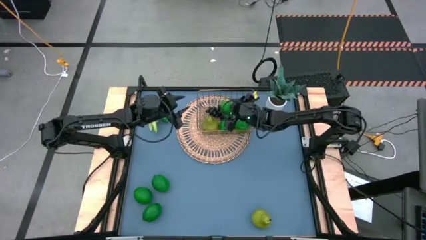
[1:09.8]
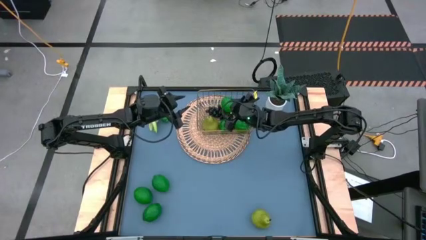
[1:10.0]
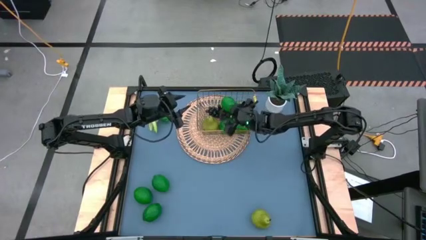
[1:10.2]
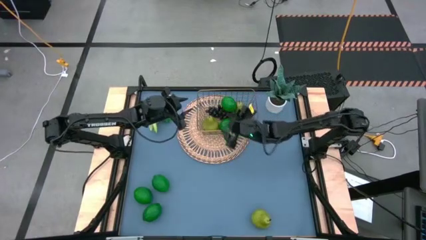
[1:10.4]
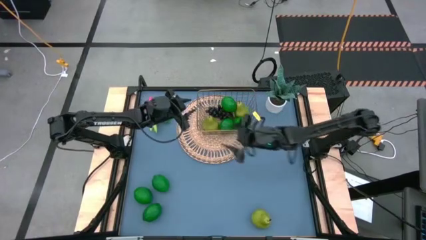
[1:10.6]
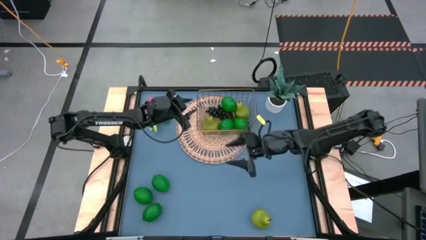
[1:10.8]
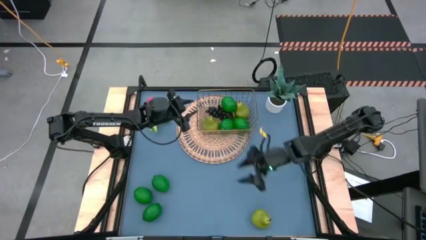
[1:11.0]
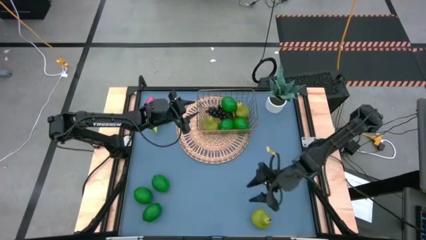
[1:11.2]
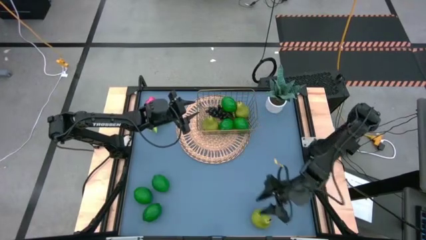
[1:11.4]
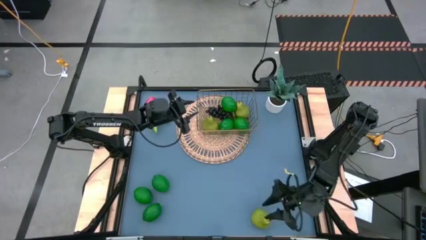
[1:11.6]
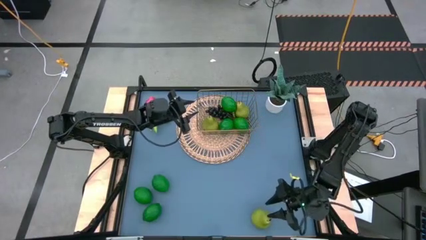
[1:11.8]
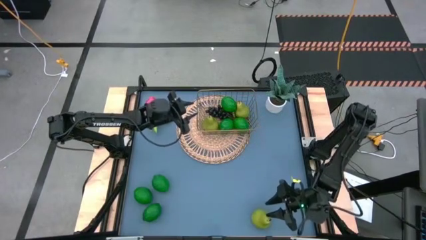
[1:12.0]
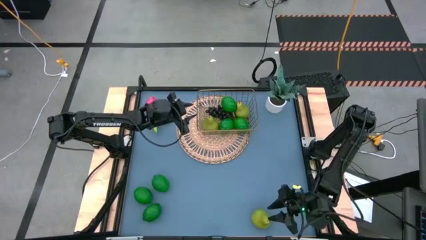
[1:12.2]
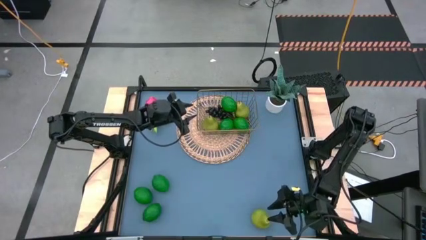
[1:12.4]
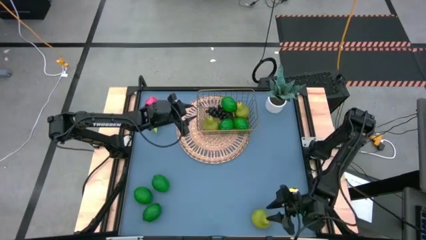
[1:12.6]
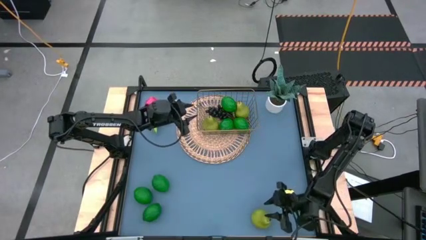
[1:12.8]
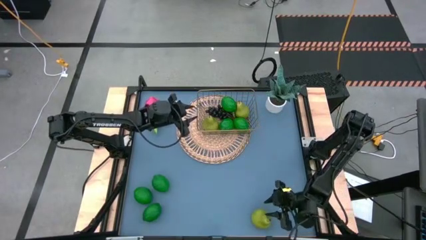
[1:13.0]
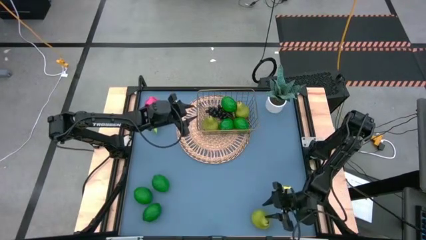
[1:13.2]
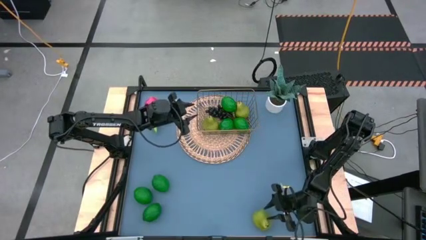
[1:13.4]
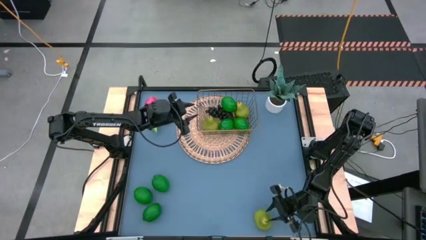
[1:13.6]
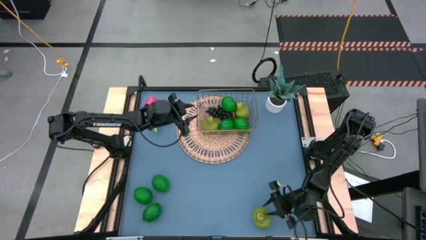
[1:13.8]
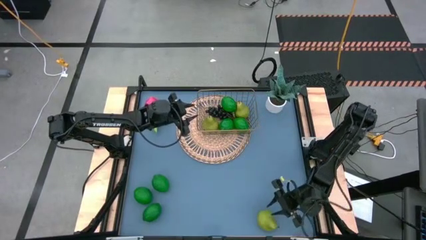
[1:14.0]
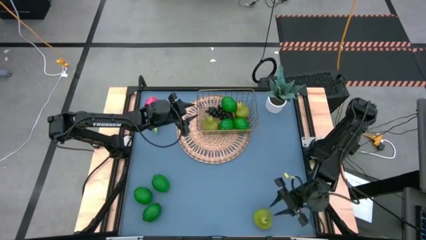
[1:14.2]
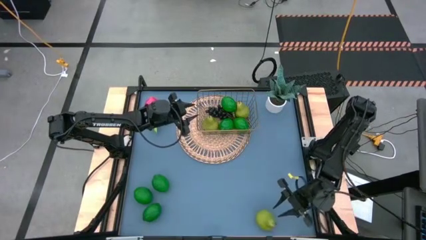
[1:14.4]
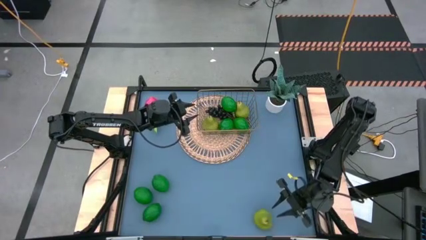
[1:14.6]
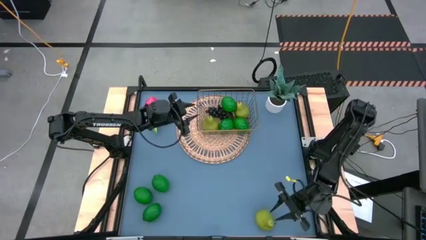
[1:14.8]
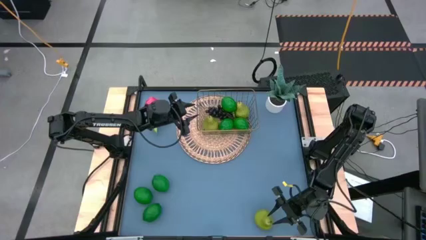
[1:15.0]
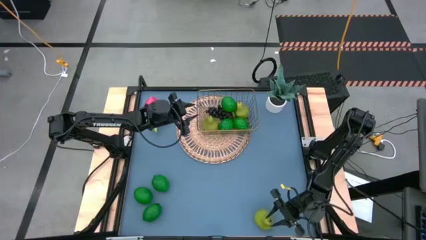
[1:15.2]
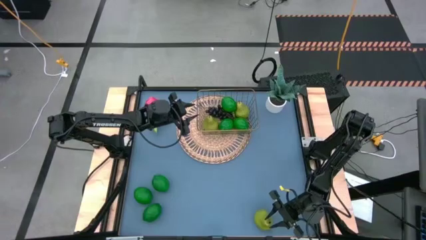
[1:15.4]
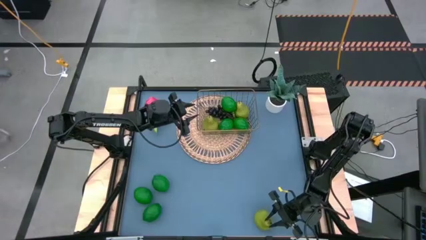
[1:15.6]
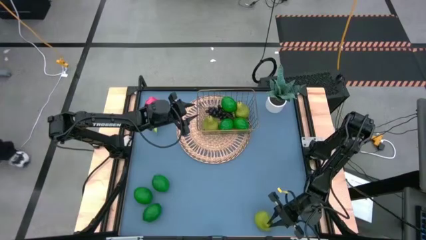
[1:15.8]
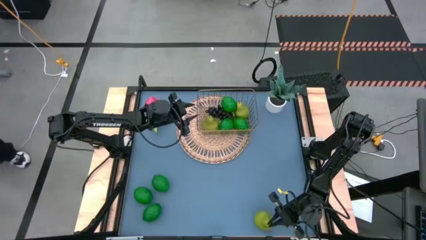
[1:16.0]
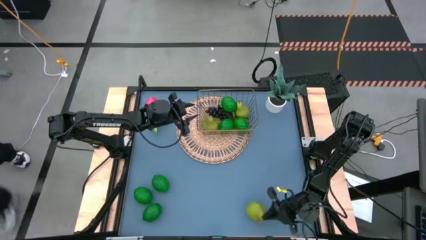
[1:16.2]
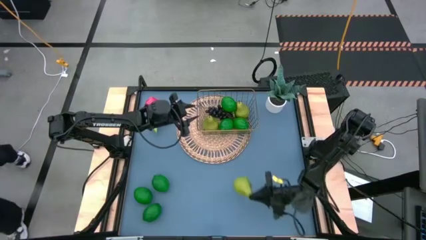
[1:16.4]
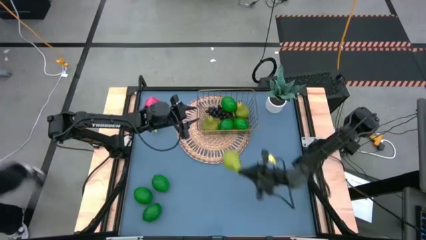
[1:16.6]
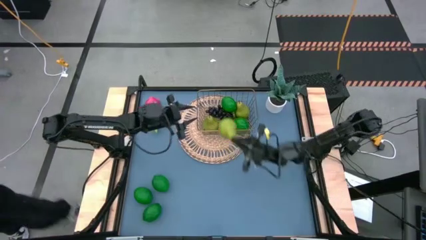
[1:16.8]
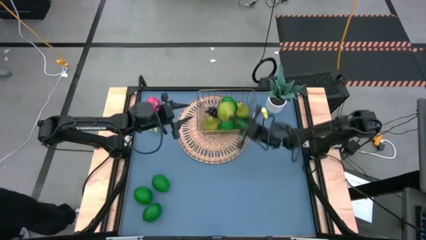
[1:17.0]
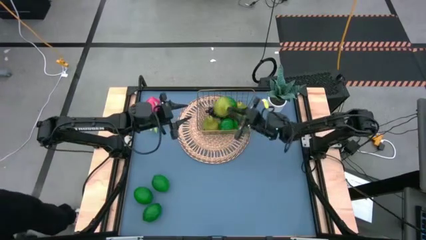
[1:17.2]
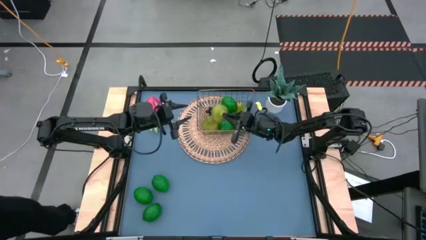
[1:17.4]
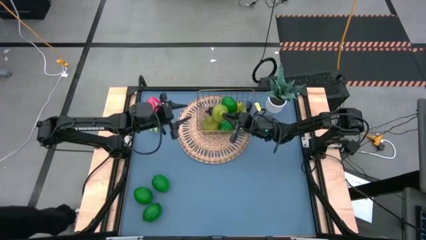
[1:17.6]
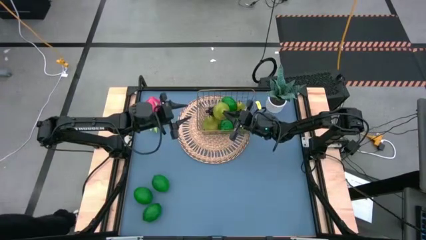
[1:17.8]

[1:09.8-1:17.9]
Task: Build produce basket
Put the green pear into the wire basket

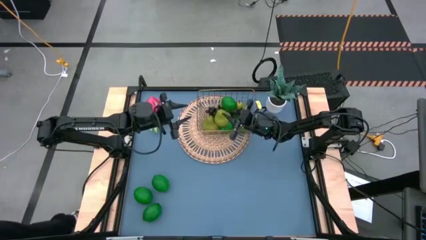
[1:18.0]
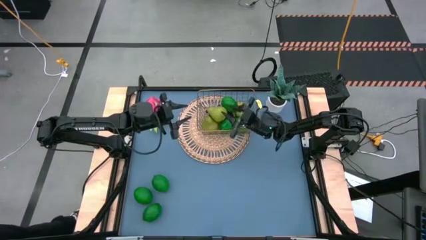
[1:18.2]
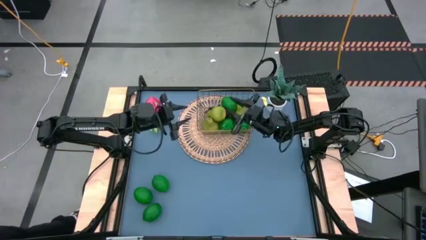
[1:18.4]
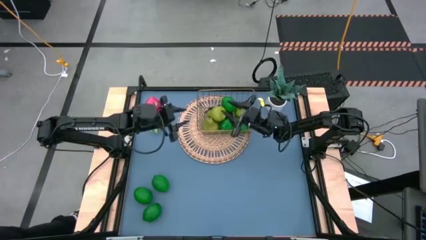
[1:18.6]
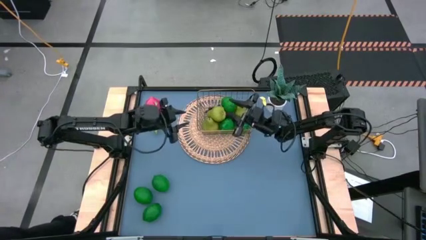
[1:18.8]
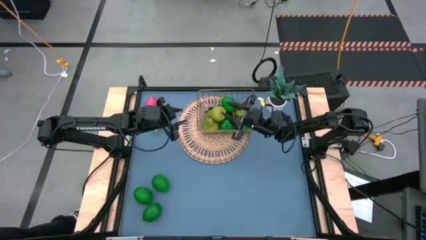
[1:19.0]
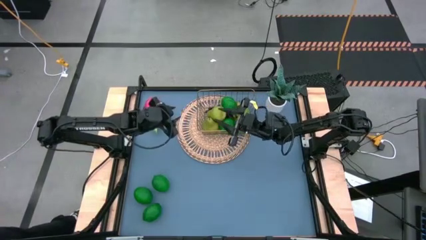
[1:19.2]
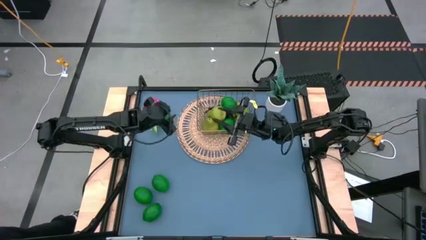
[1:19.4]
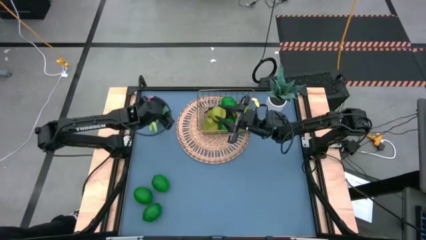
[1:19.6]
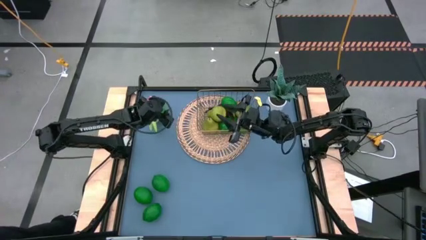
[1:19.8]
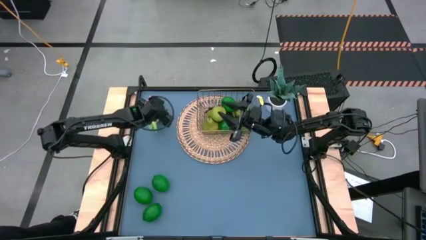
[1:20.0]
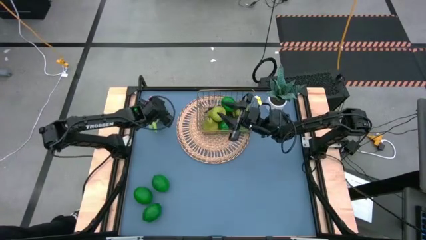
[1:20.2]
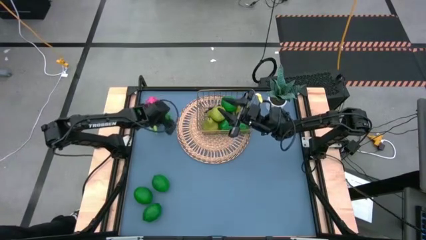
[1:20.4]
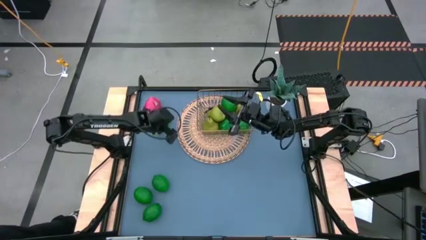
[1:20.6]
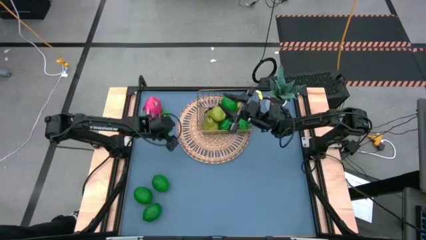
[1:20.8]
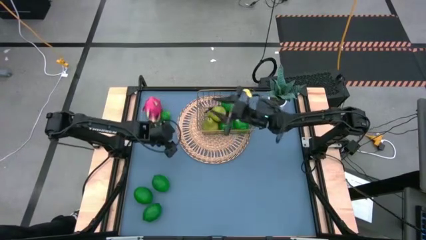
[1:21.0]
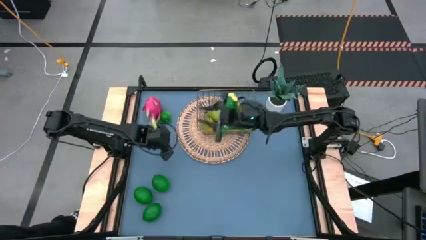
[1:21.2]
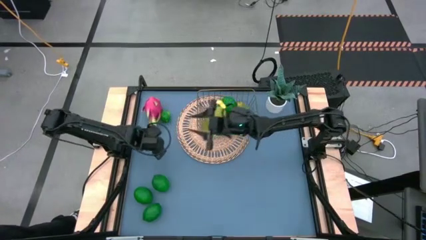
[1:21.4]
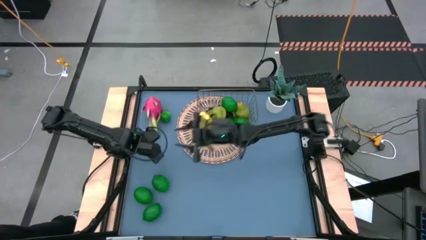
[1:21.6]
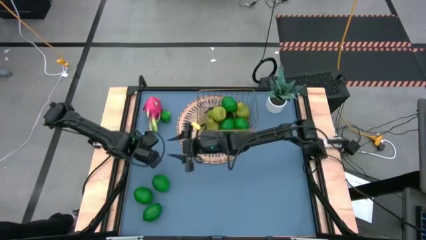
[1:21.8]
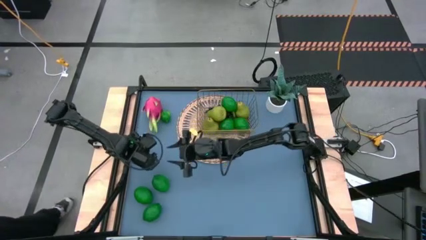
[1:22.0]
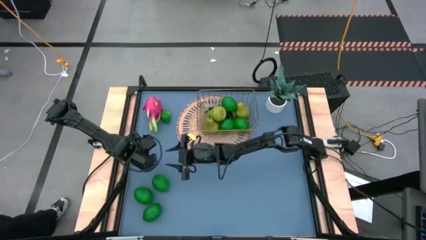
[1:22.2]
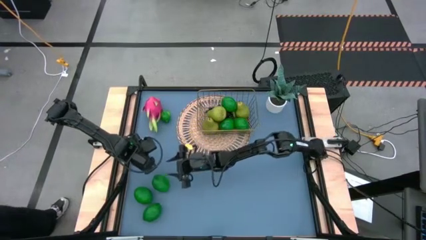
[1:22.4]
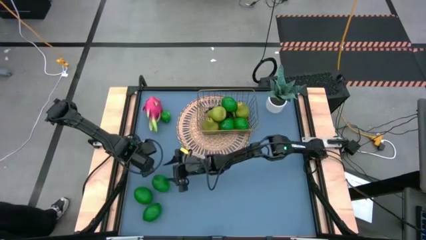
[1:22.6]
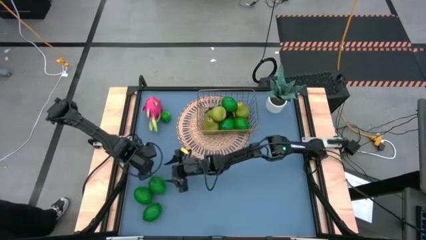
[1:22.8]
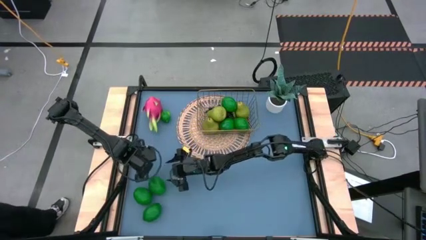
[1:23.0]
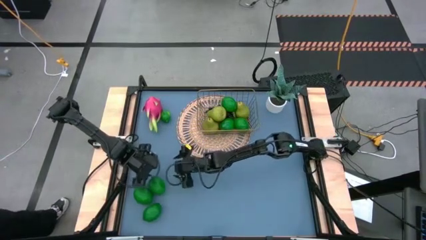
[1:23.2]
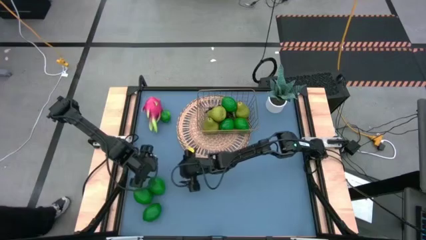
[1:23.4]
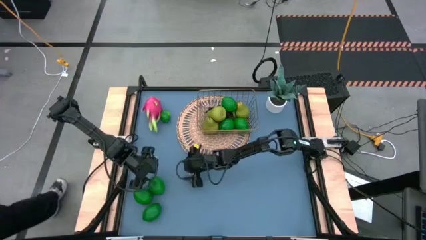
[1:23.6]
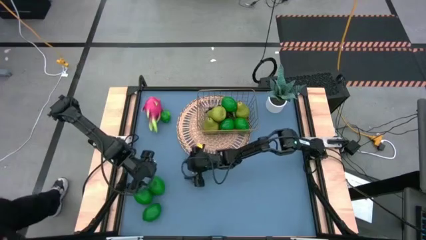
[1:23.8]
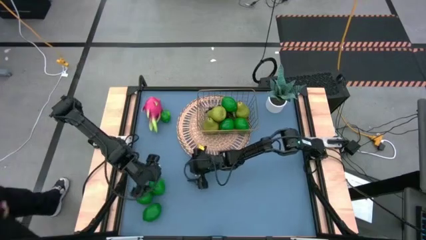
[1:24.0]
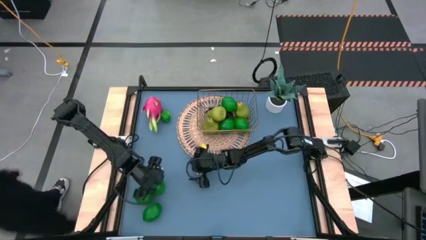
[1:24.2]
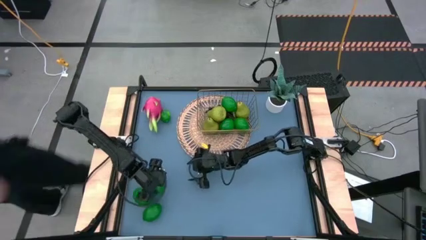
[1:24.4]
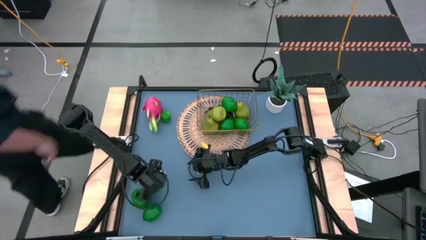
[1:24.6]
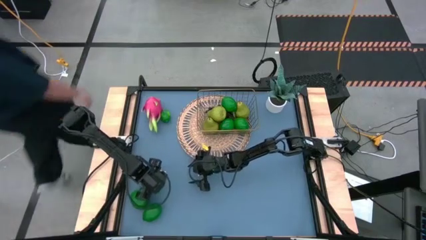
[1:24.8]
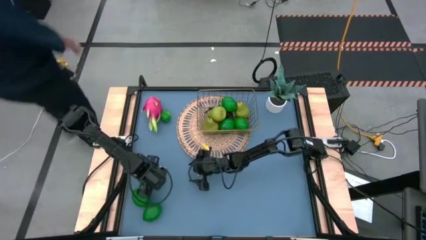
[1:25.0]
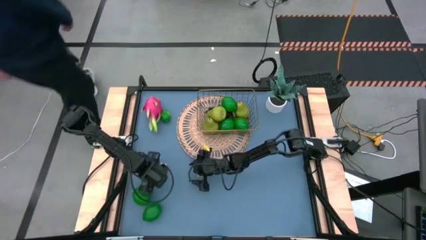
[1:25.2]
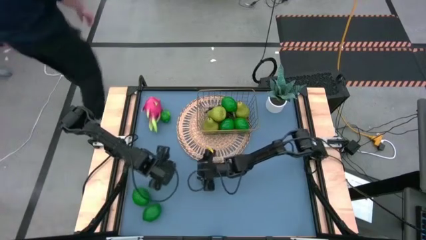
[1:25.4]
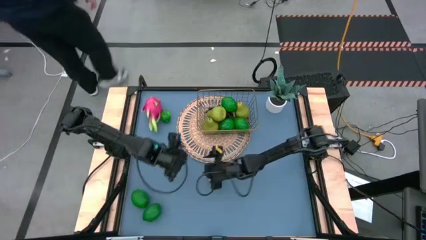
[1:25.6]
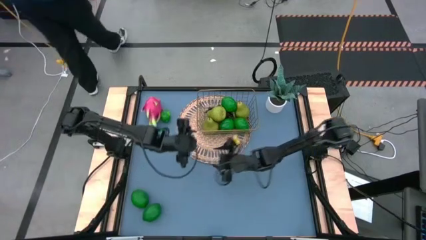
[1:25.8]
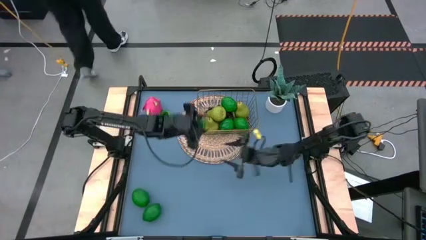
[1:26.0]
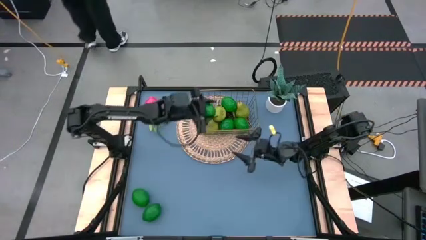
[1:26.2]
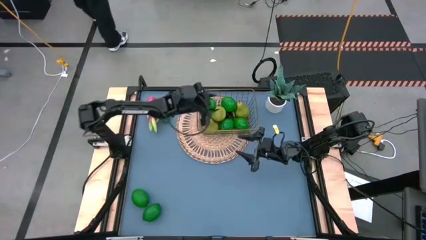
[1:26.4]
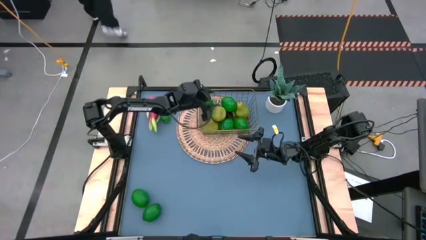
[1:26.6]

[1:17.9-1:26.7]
Put the green lime into the wire basket
